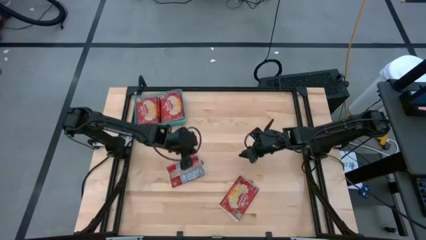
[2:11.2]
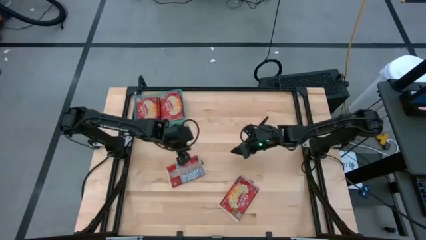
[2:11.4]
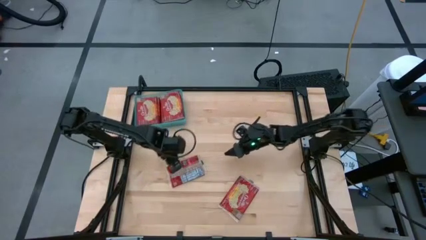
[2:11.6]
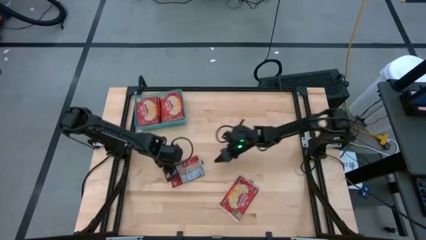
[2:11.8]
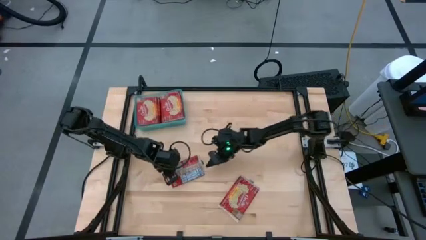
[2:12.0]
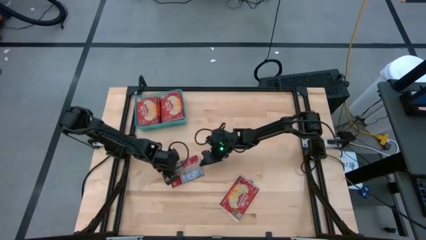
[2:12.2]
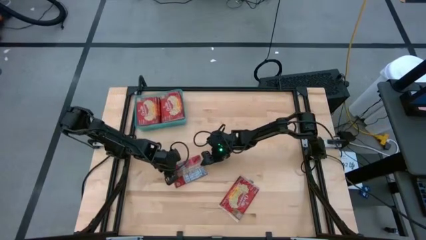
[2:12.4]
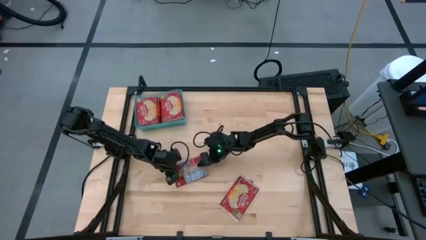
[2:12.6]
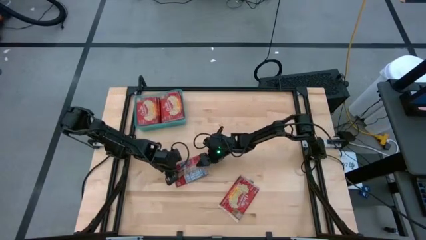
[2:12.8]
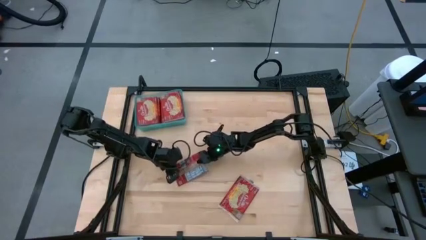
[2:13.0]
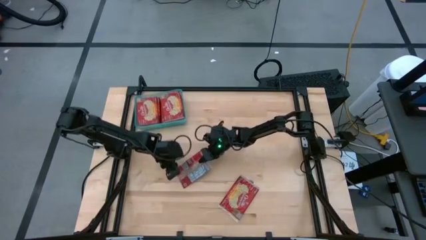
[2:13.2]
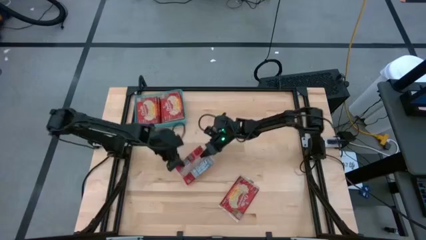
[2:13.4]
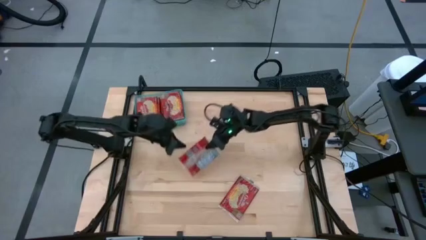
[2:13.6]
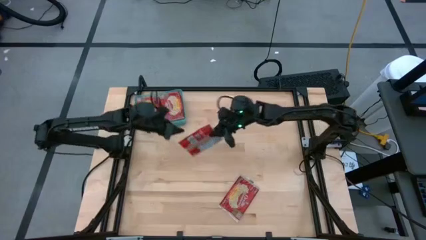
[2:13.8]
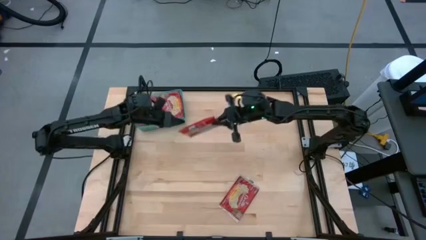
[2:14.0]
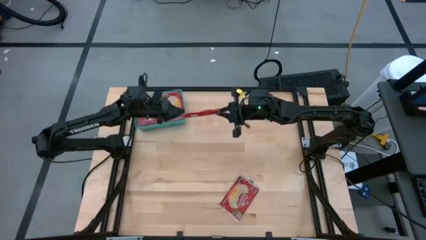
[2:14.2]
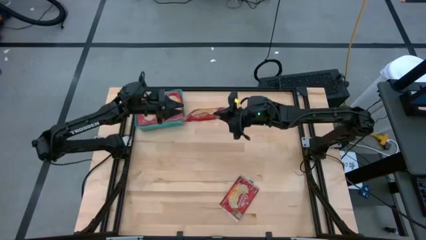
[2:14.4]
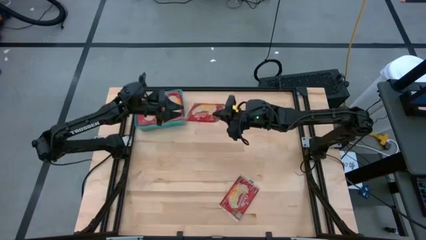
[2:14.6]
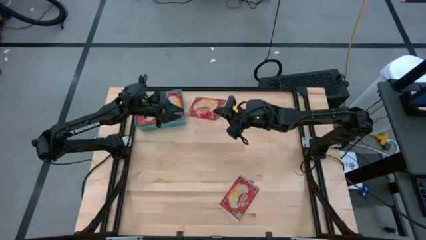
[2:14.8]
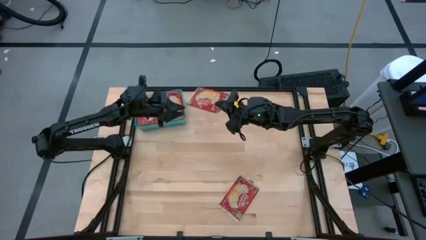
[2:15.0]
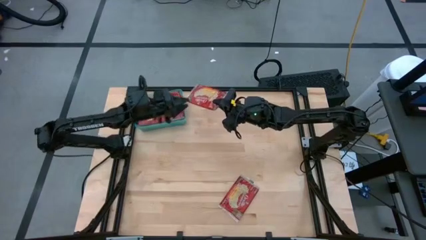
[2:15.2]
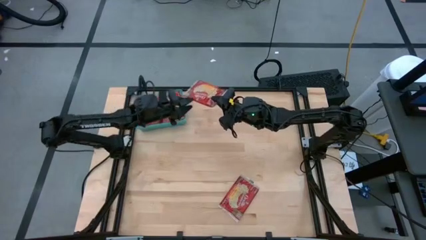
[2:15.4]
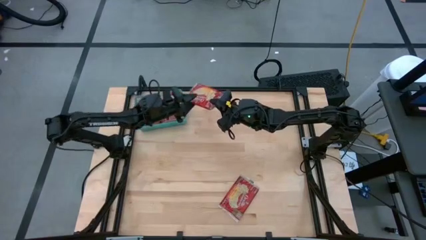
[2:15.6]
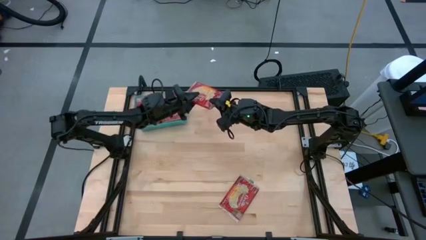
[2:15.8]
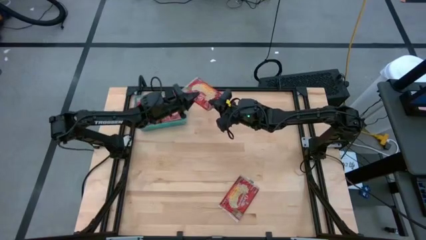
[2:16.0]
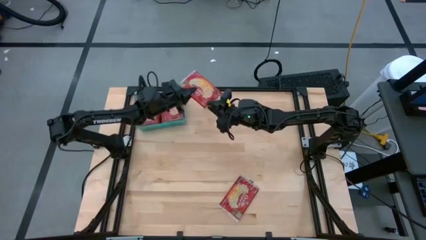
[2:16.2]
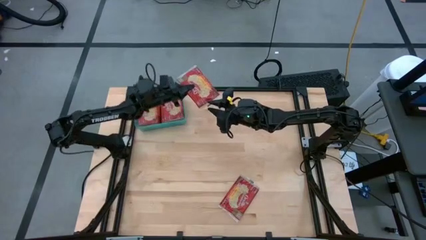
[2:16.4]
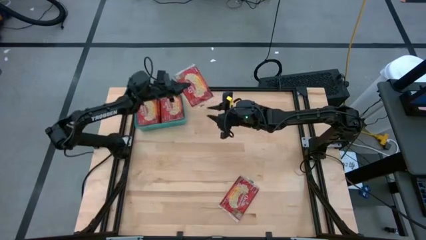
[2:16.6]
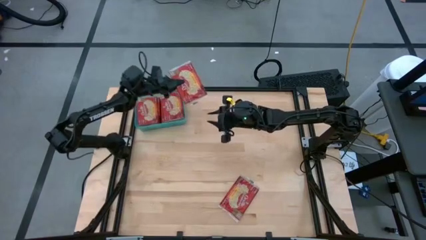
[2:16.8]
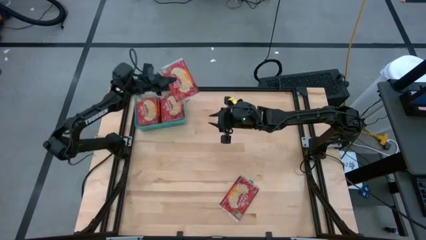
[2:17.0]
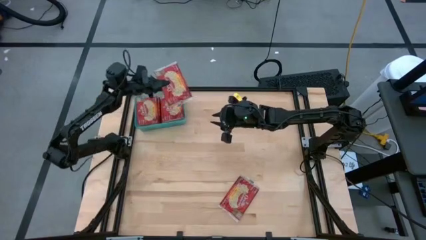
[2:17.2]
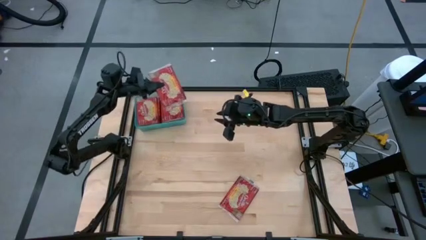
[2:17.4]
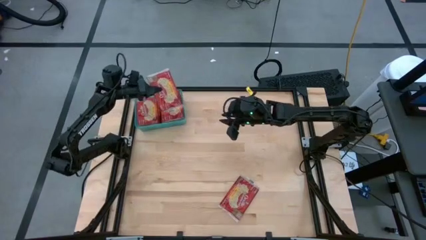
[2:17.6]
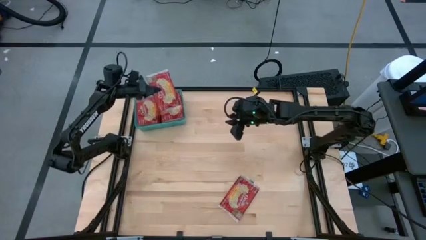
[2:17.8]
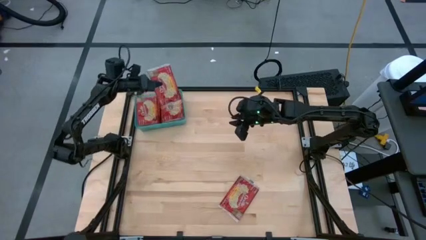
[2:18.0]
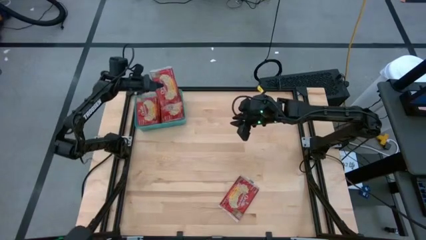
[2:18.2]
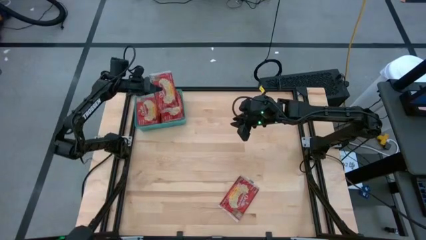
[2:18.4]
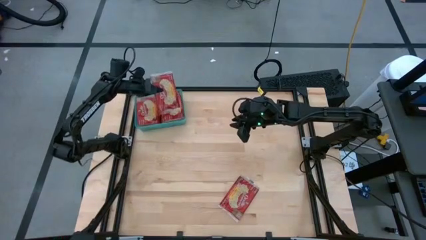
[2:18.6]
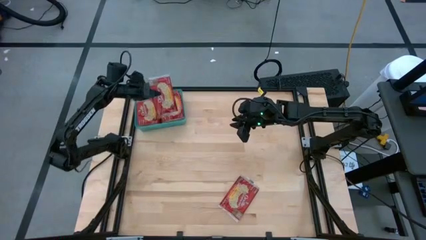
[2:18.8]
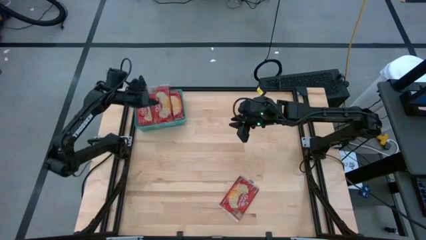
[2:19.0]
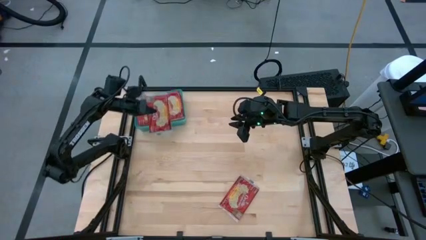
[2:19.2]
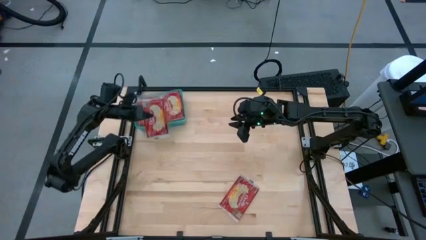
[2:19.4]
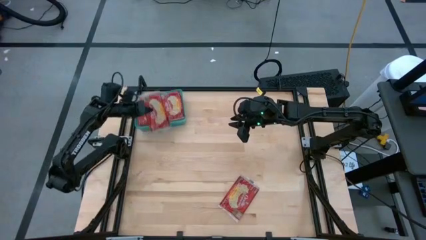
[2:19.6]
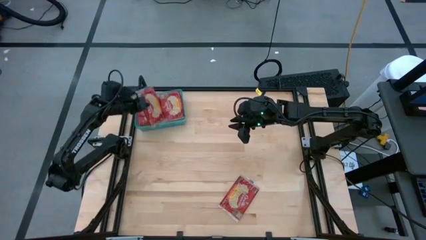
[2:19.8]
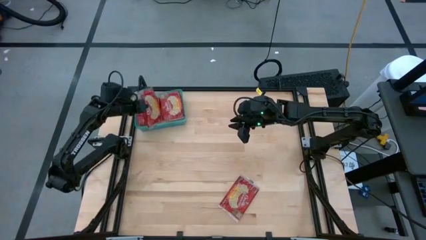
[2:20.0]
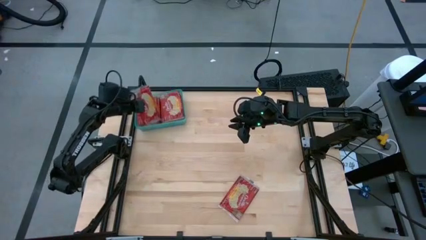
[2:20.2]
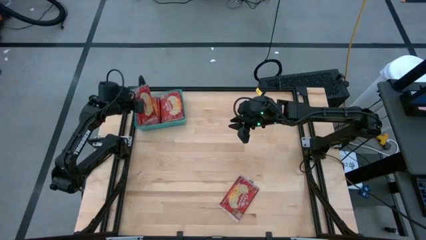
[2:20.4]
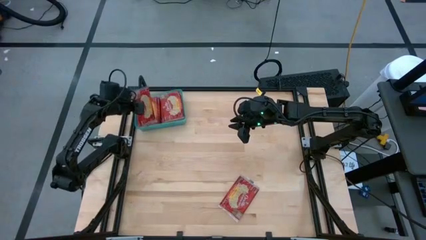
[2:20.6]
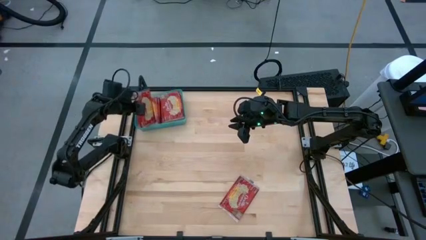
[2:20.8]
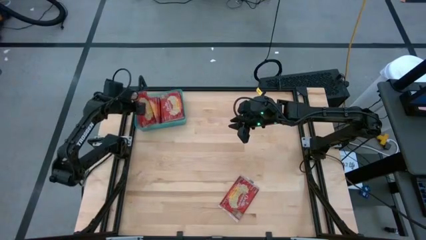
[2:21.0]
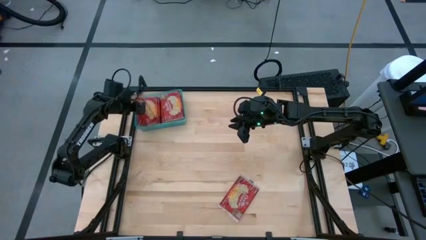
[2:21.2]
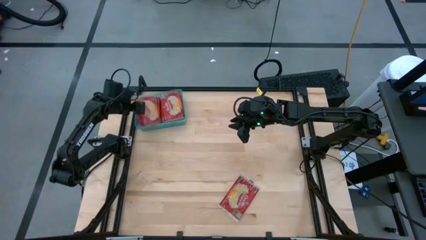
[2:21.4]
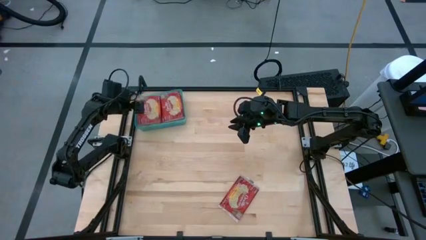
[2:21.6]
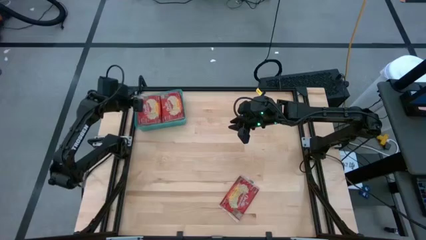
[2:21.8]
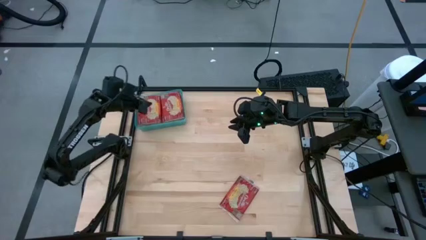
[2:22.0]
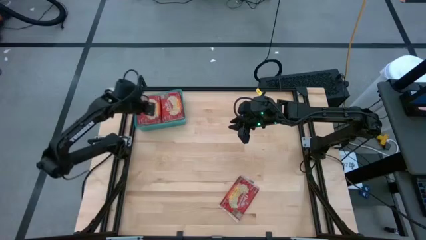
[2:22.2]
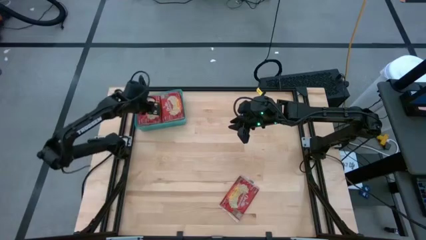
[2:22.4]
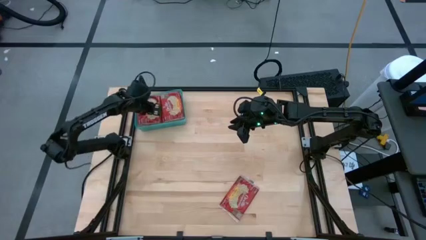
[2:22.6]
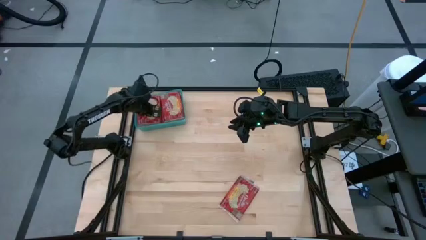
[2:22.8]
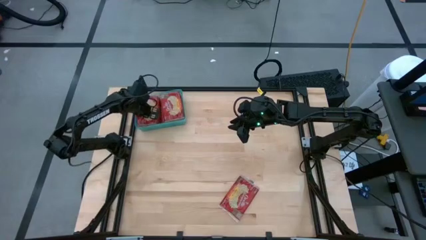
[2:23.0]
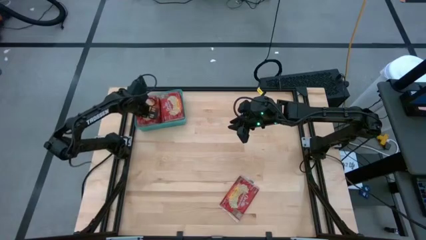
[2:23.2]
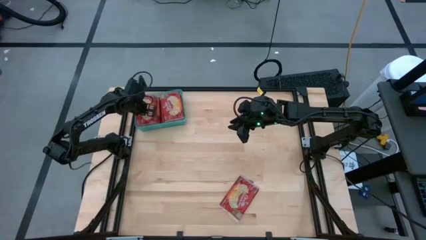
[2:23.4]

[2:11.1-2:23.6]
Task: Sort popcorn bags into baskets
Put the red popcorn bag into the blue bin

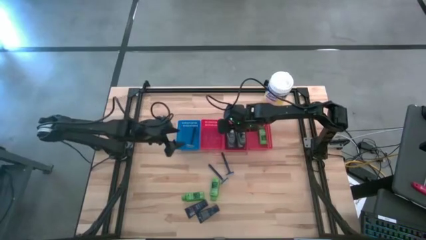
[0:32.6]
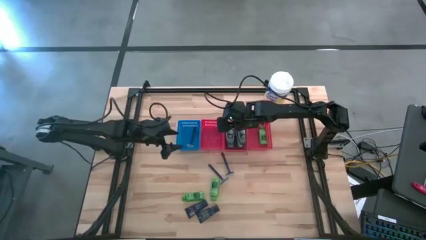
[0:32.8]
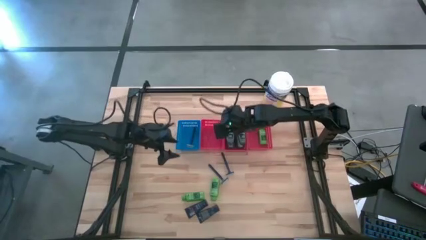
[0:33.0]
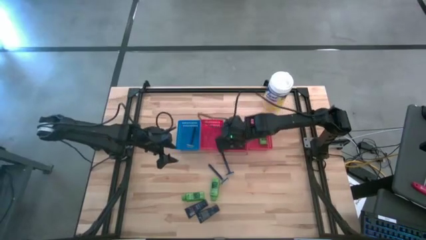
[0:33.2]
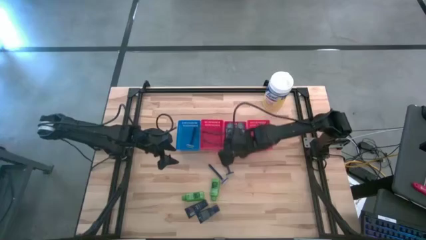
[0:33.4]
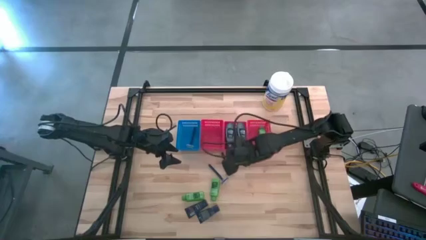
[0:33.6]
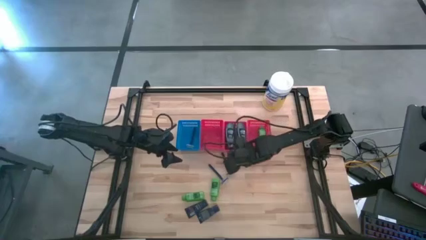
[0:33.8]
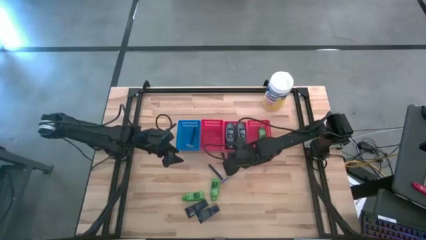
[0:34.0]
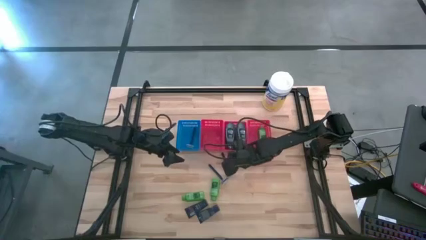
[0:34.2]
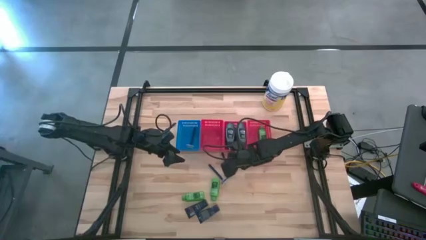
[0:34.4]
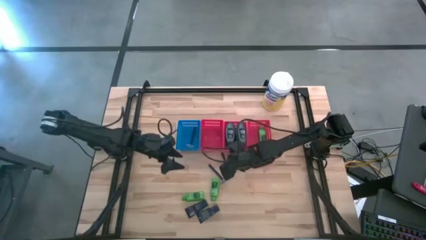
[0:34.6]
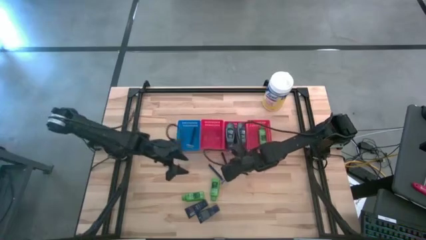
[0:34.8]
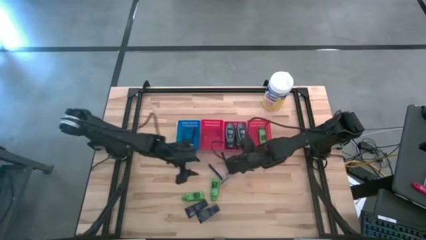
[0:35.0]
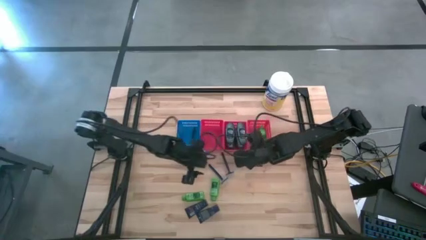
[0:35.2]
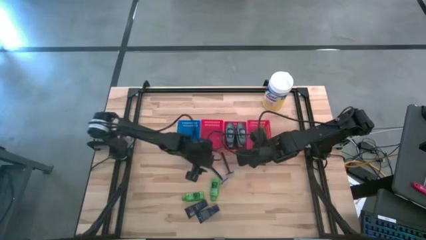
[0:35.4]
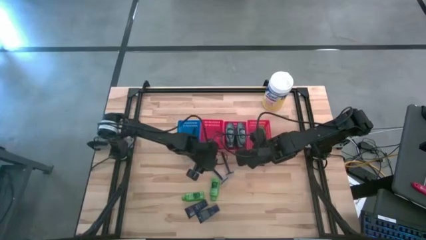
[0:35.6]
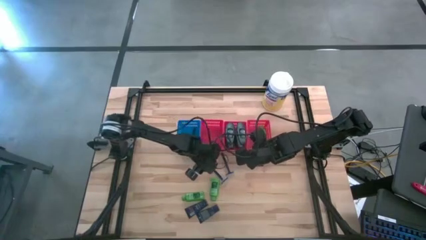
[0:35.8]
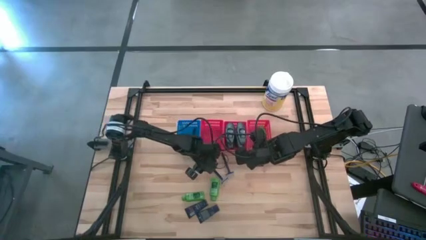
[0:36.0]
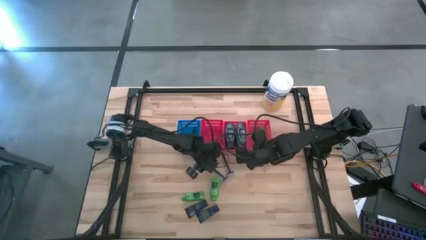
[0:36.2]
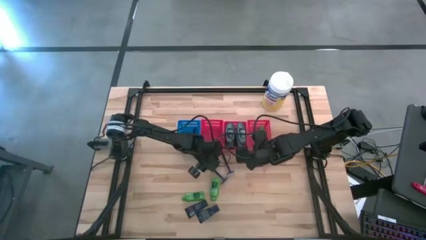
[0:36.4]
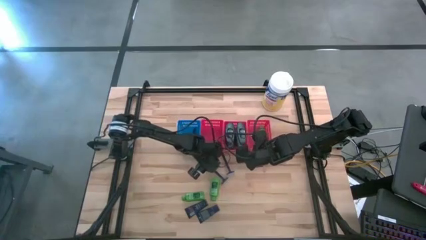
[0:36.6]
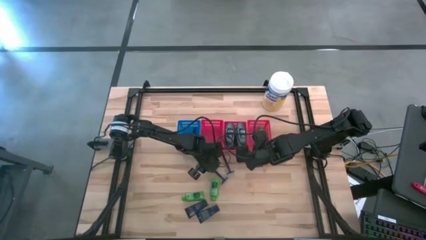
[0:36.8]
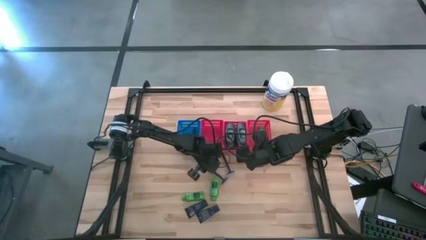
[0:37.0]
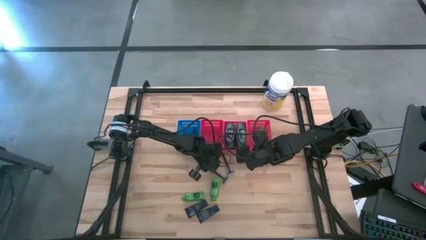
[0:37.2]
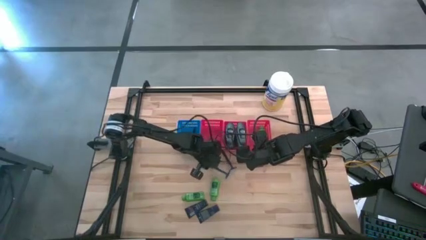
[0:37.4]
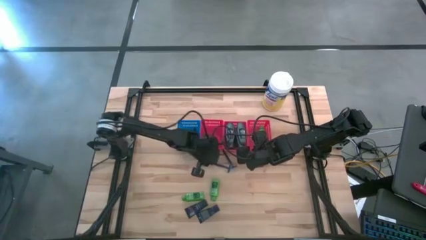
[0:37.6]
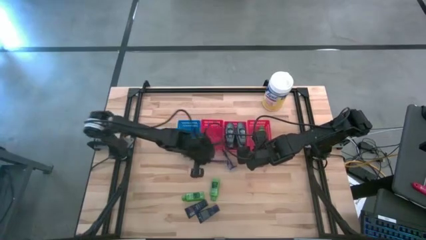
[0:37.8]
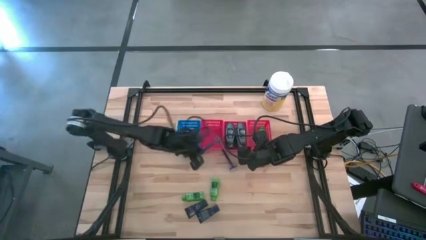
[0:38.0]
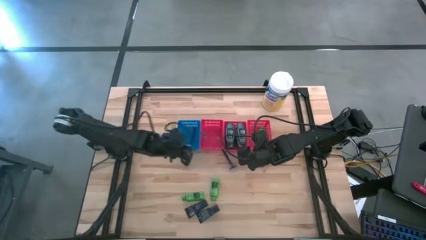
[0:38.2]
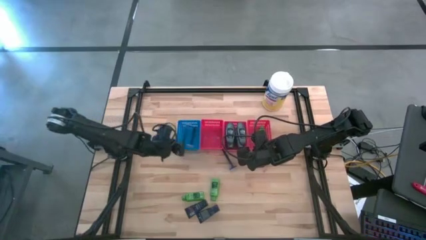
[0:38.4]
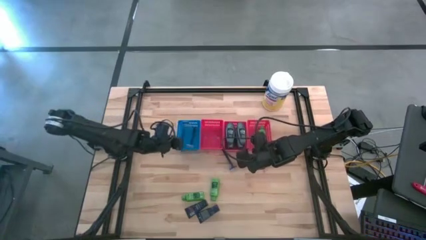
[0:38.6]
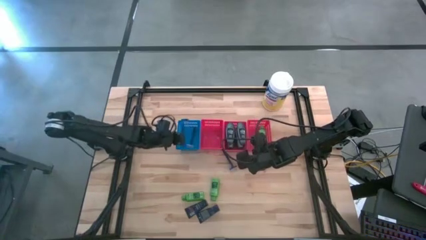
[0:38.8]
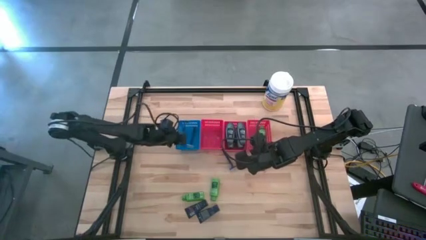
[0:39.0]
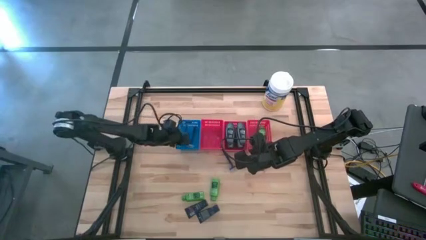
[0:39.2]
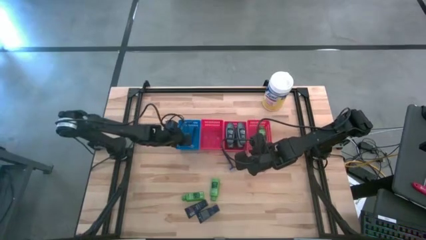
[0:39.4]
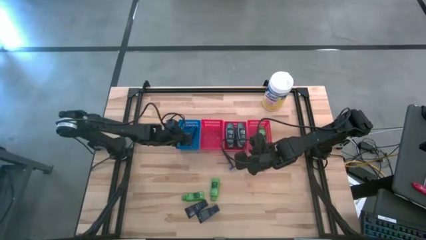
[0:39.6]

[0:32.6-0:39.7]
Task: Pick & Place Travel size toiletries
Put the blue razor into the blue bin
